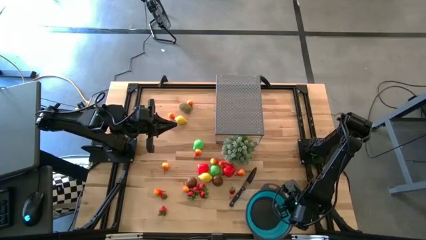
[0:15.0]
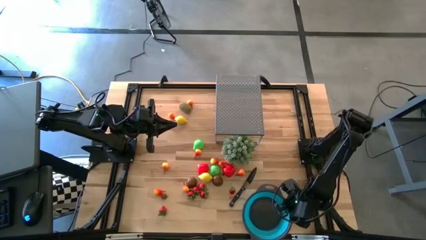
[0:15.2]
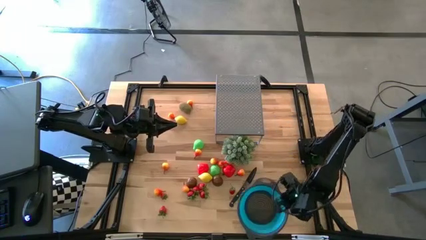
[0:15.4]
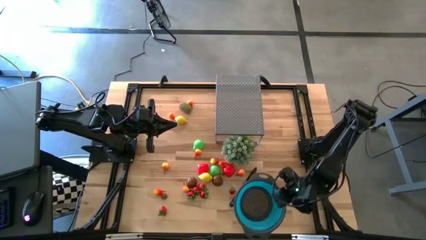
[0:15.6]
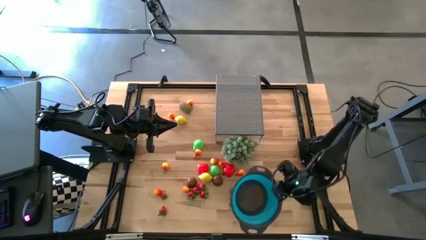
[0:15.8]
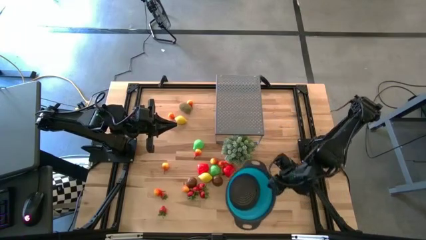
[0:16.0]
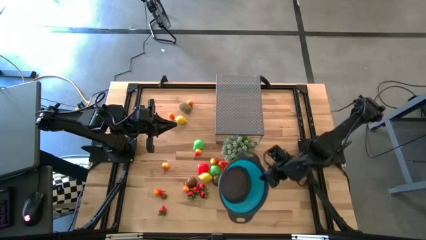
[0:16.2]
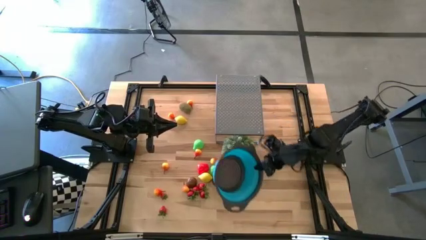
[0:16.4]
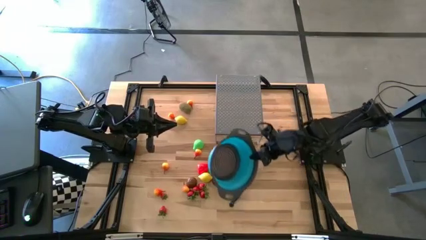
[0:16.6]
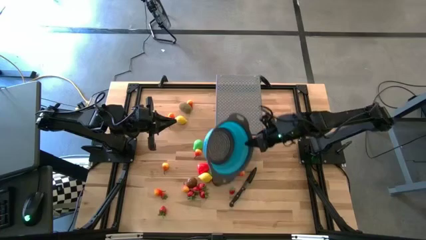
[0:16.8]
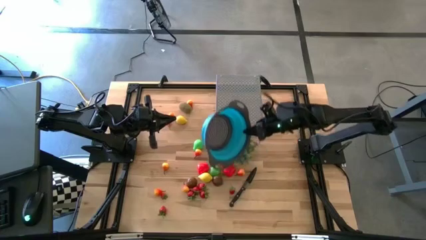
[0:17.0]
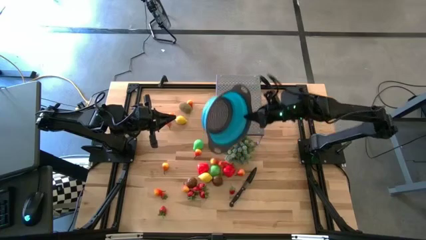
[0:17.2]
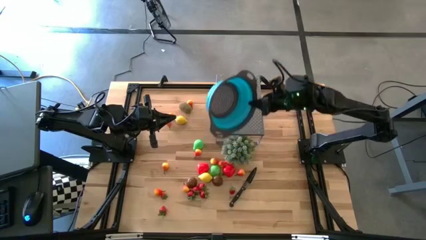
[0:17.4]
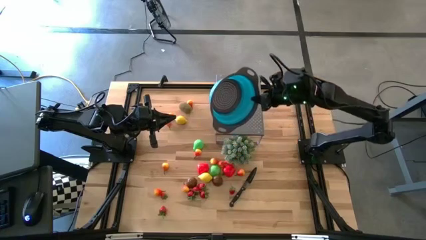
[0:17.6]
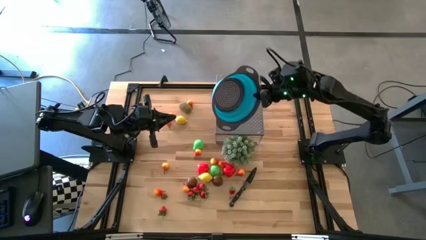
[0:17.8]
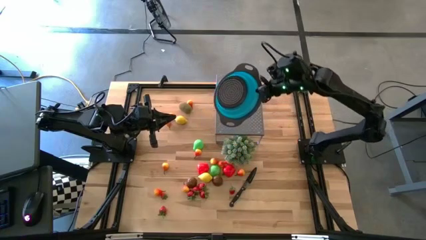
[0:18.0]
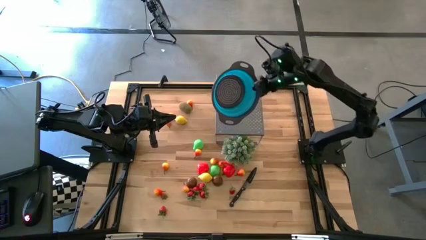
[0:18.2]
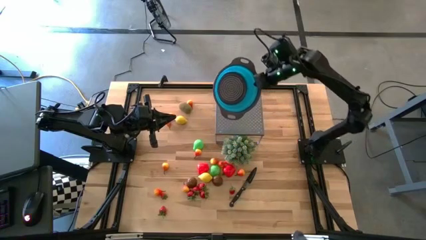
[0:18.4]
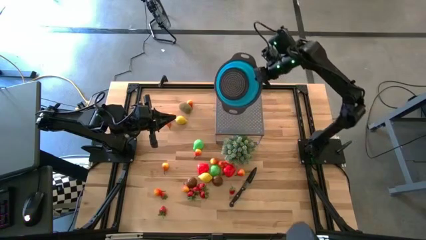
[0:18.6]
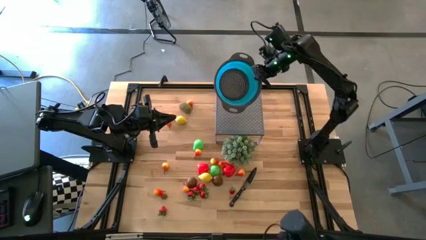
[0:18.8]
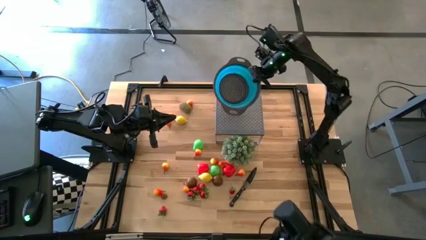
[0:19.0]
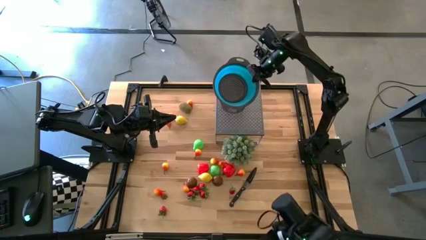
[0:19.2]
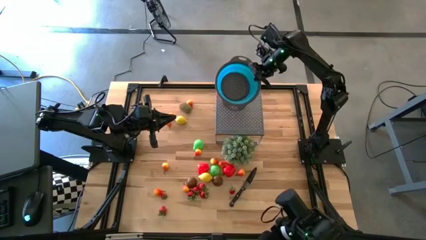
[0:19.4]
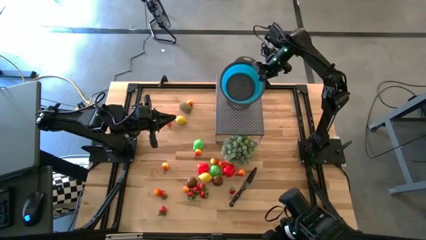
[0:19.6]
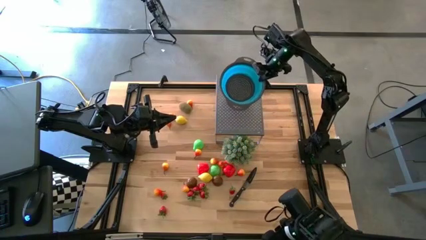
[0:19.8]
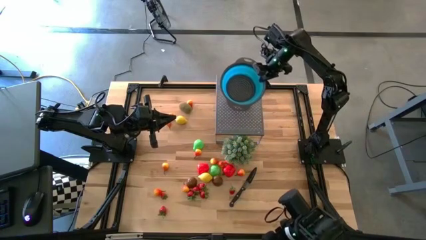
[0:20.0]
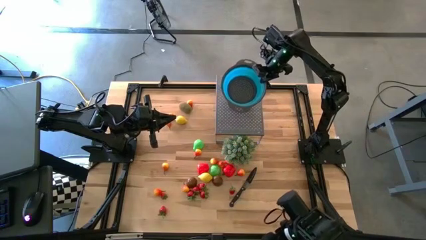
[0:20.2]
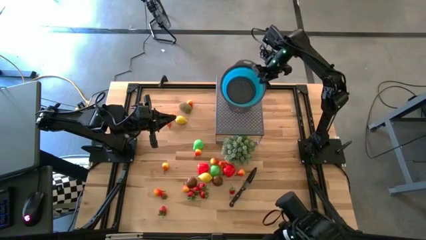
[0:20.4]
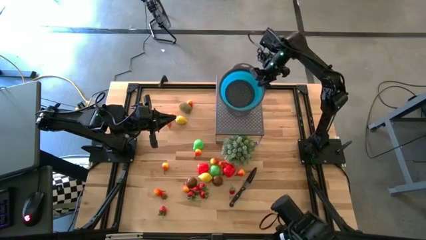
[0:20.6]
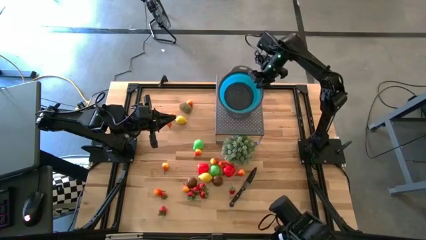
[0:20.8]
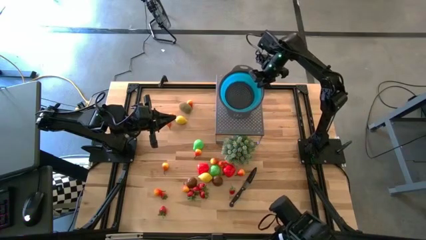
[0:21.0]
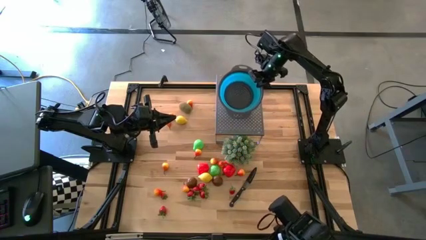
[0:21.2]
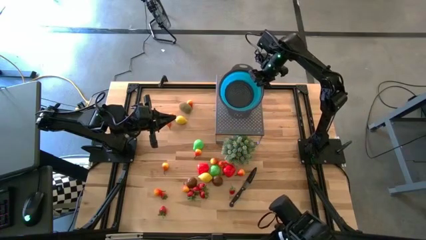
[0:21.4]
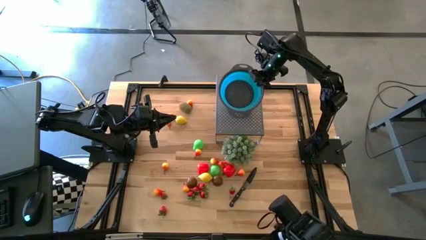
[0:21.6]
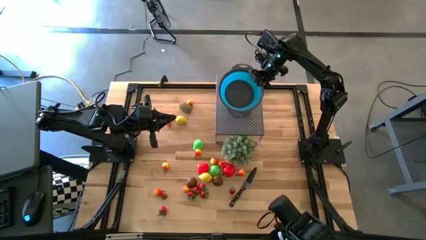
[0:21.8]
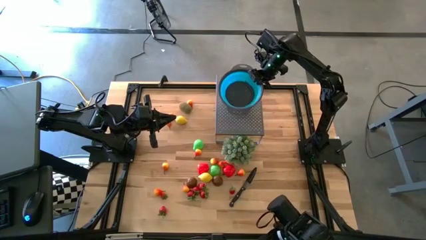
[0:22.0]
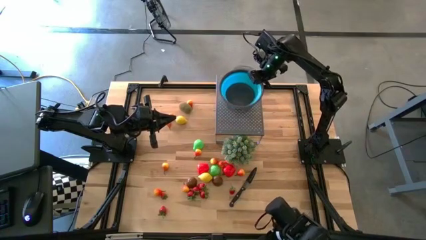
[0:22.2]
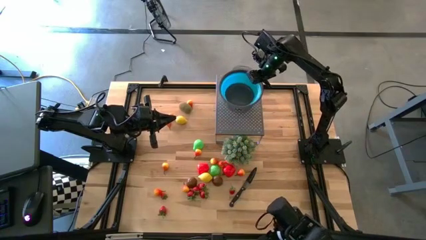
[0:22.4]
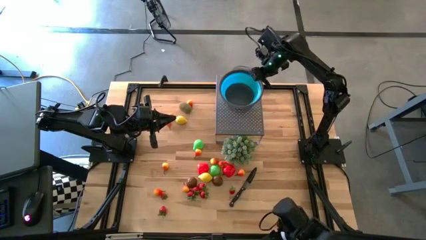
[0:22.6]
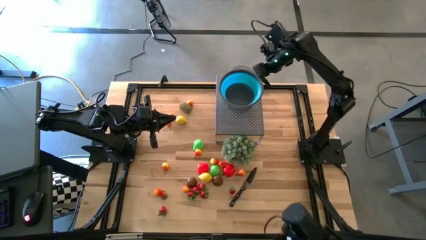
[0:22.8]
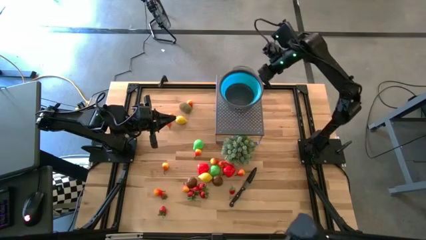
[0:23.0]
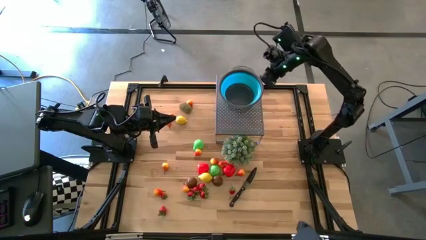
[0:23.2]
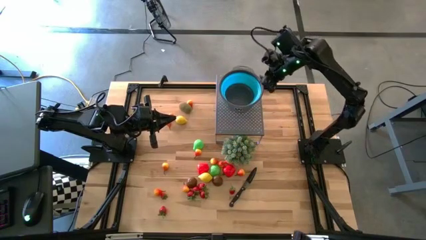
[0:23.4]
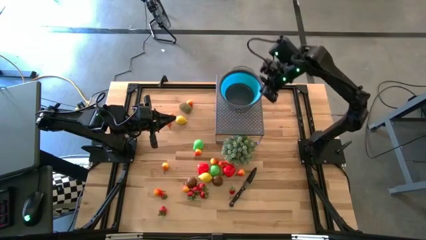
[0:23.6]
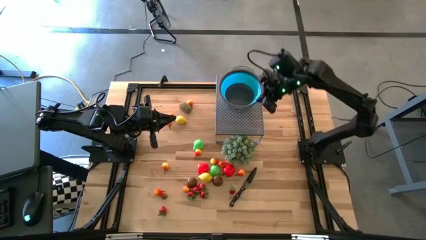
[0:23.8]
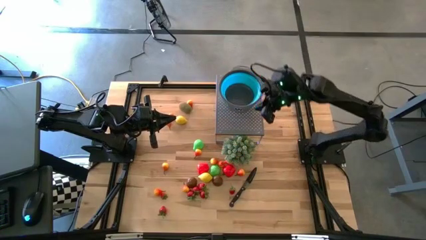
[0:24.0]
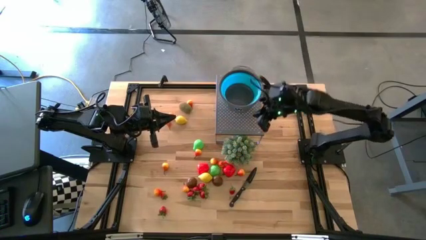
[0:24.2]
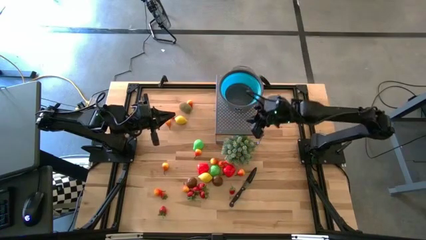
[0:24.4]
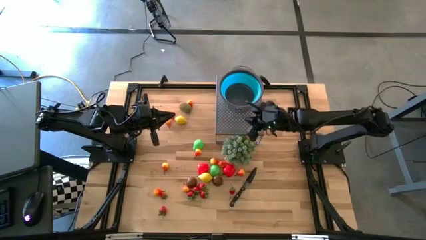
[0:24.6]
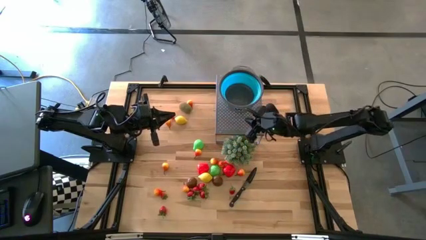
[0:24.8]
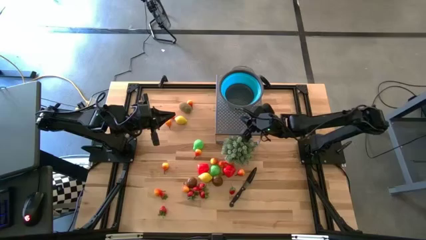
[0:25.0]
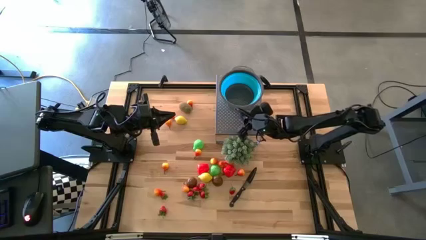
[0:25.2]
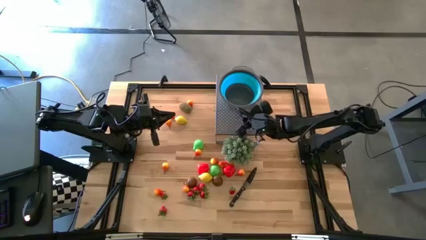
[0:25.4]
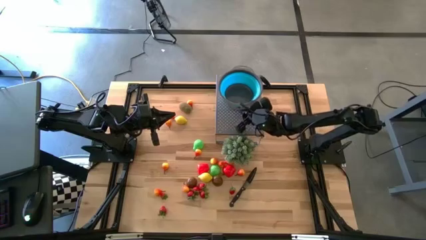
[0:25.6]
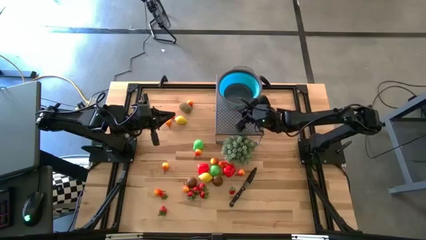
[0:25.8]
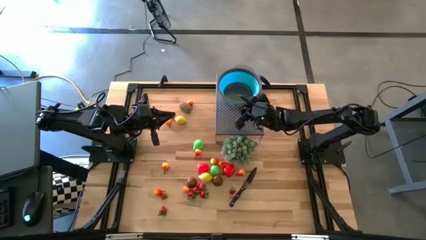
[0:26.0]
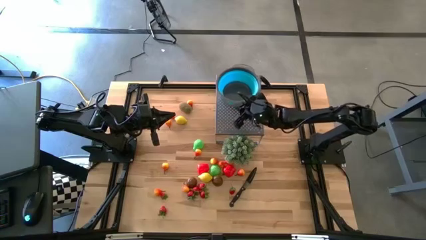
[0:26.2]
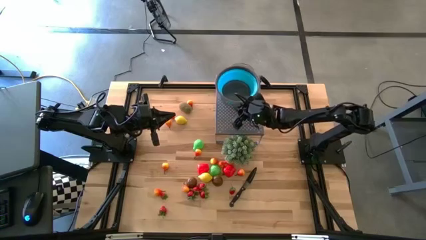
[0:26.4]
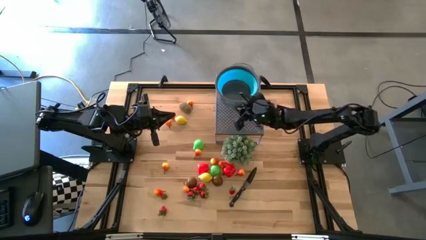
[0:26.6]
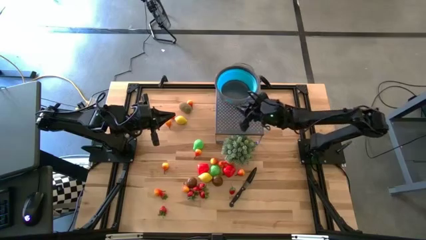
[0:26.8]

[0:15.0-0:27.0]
Task: Pick & Place Fruit
Put the blue strainer bowl on the shelf

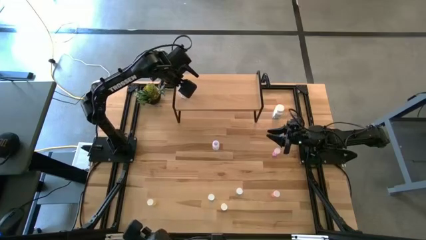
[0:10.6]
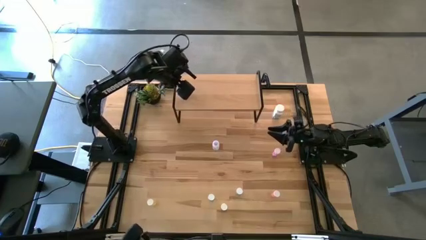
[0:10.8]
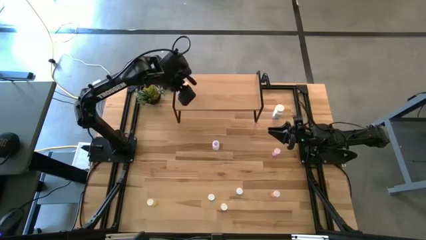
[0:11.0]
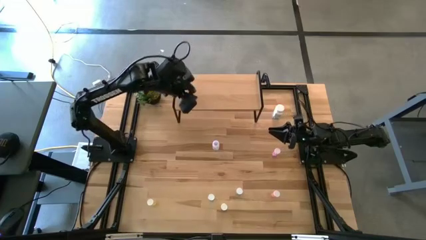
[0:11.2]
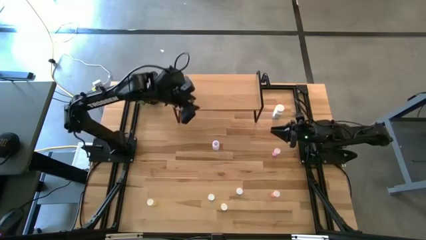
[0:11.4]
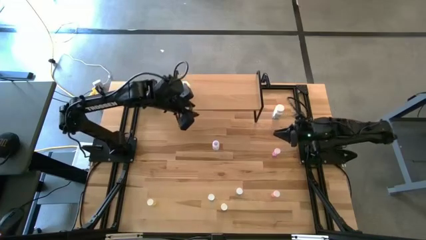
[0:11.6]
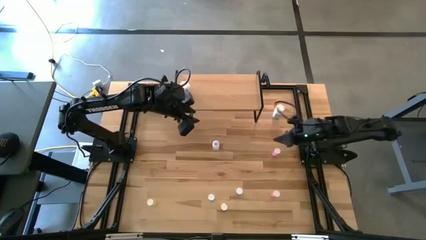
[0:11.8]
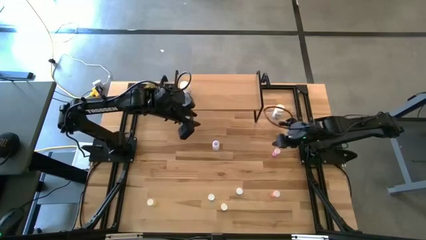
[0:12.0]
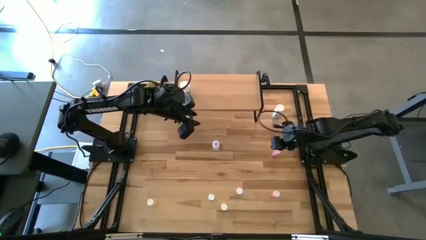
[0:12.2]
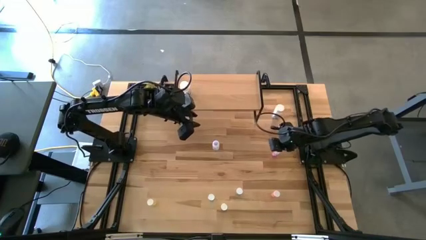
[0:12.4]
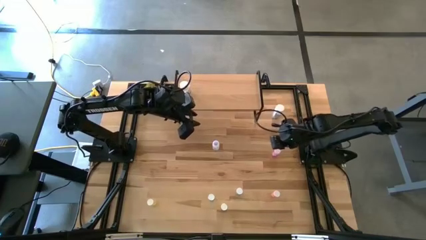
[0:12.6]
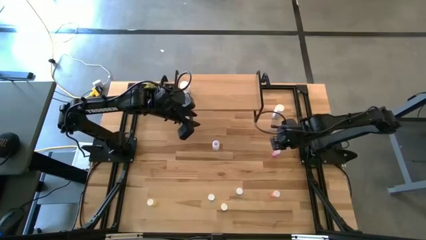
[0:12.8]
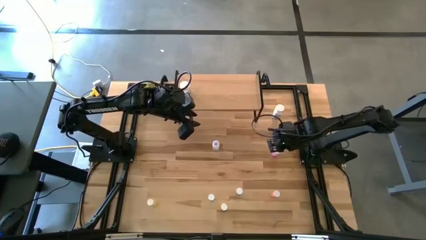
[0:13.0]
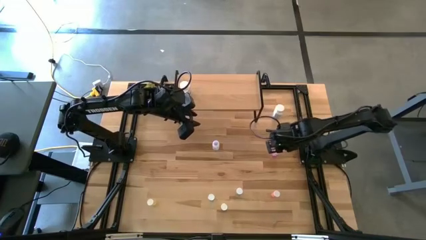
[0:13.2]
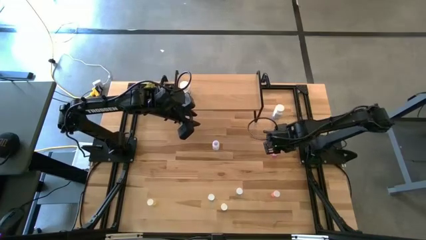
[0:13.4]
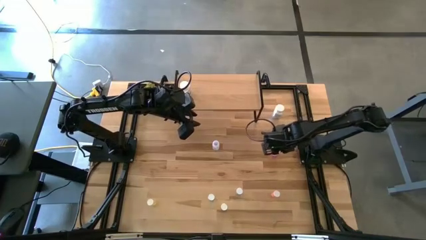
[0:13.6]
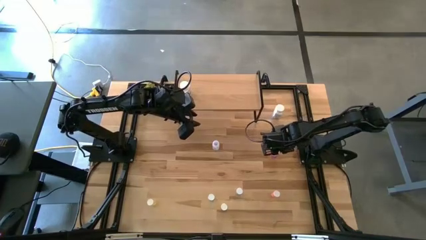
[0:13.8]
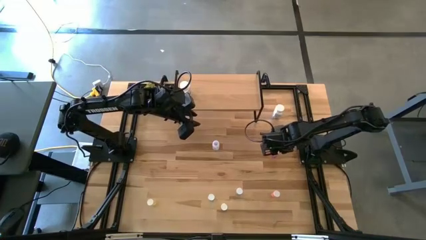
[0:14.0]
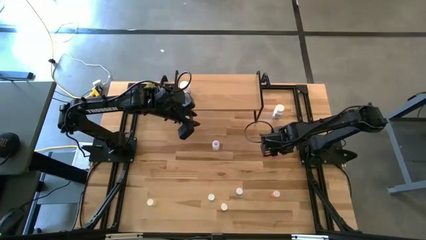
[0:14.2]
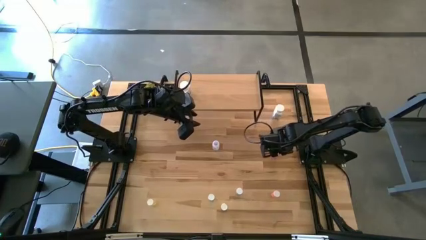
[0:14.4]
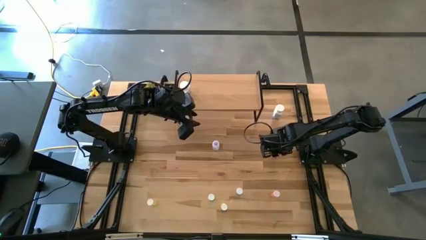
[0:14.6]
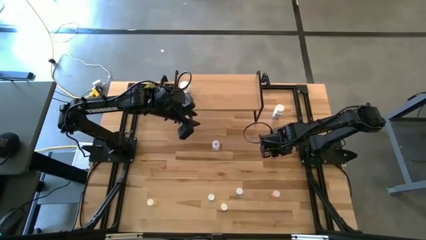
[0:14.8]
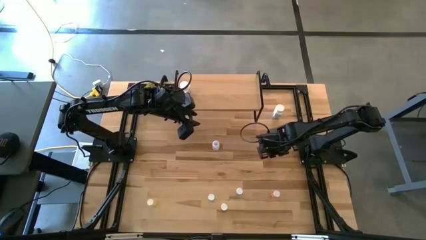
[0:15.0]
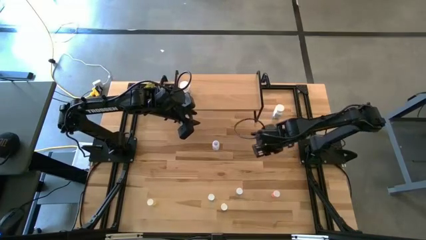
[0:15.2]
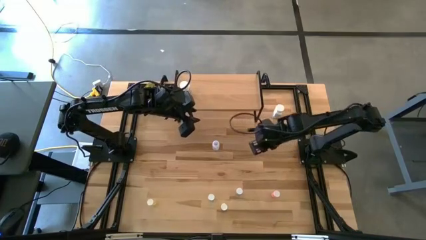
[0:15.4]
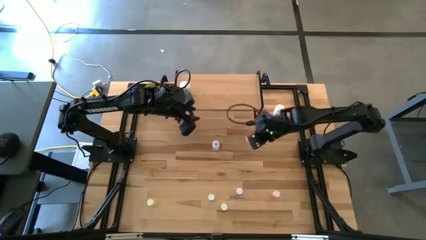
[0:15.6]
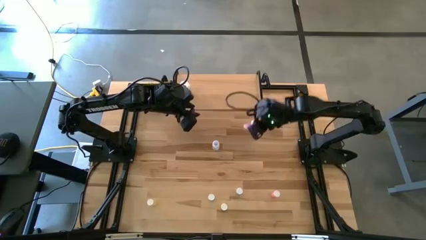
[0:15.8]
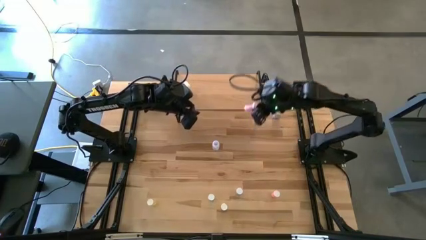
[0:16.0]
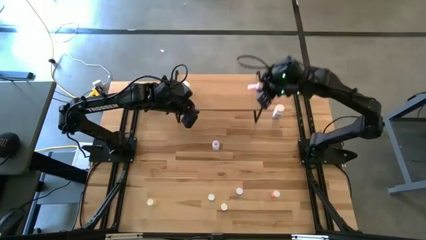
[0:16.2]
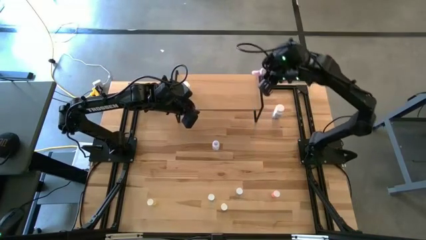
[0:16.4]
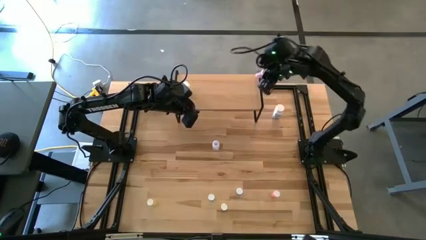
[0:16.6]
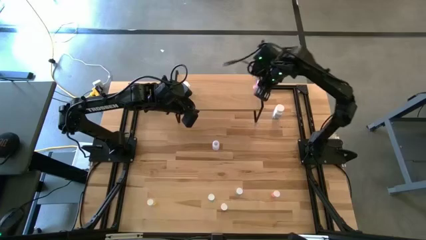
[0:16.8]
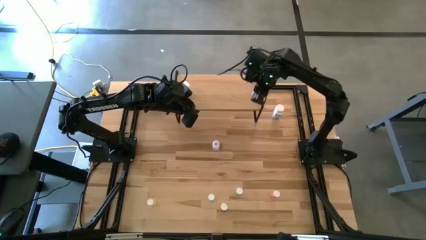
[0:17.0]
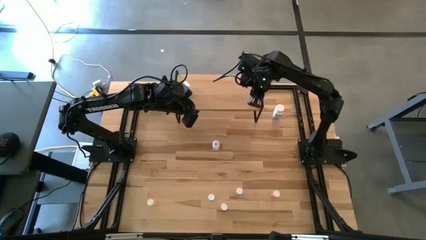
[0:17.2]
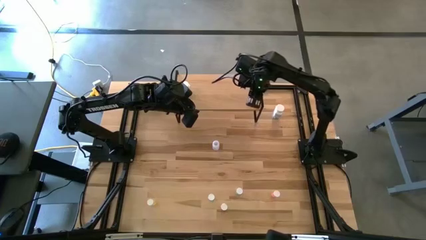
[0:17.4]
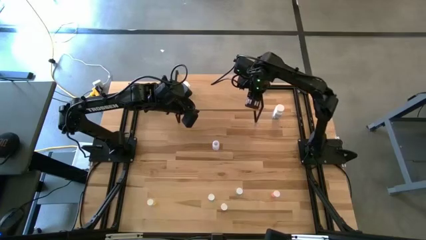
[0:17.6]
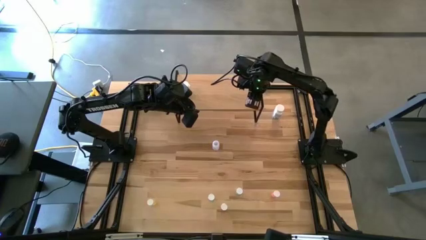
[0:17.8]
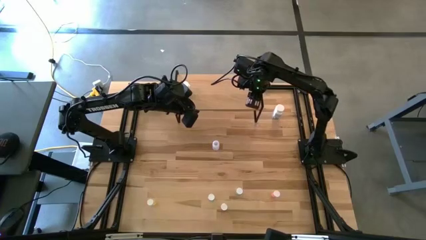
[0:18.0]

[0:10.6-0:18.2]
Task: Pick and place medicine bottles onto shelf by color
Put the violet pill bottle on the shelf
